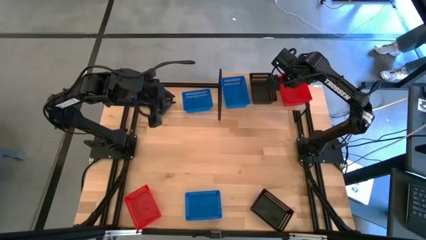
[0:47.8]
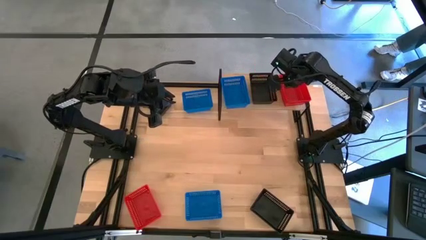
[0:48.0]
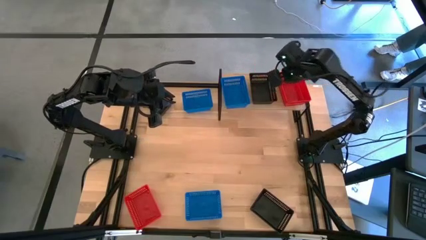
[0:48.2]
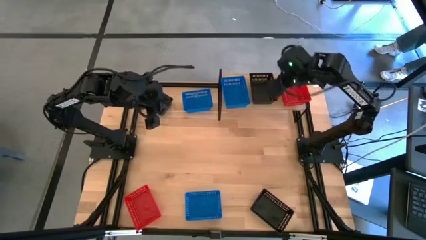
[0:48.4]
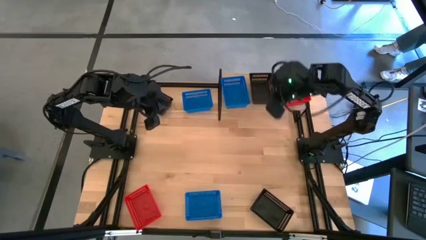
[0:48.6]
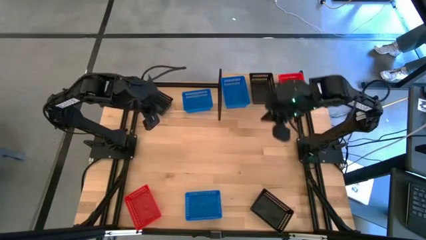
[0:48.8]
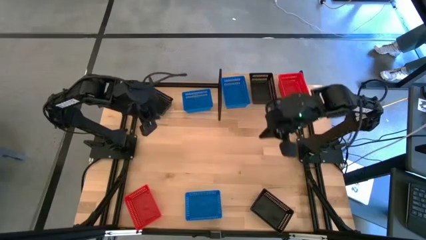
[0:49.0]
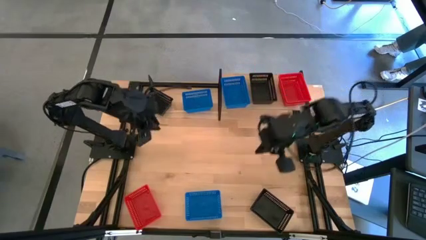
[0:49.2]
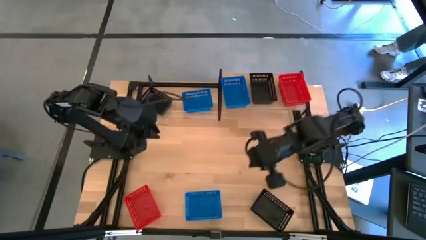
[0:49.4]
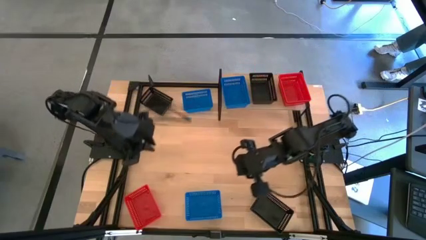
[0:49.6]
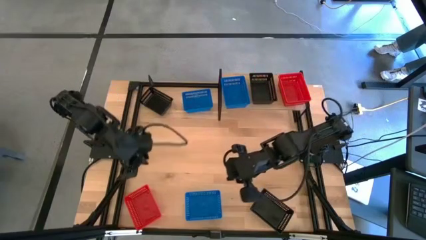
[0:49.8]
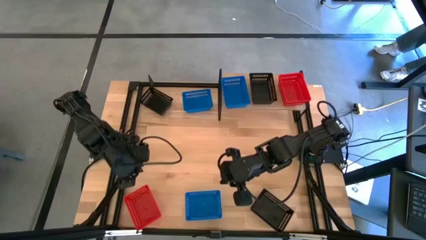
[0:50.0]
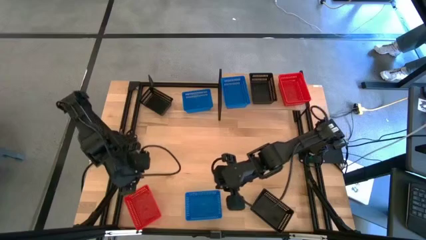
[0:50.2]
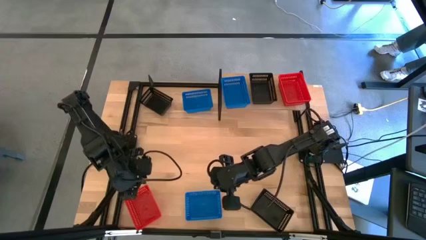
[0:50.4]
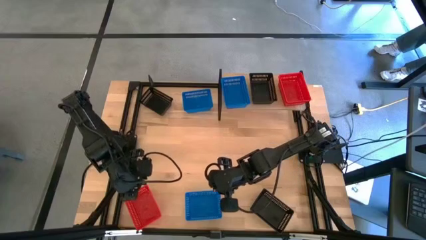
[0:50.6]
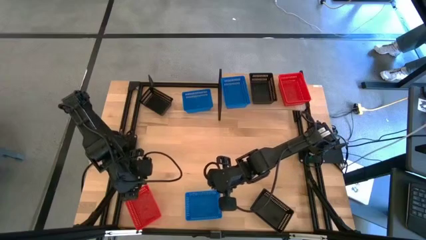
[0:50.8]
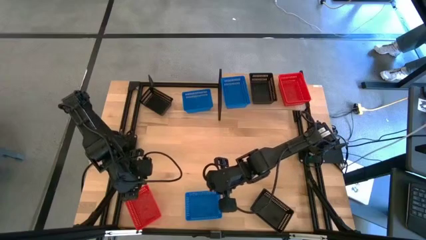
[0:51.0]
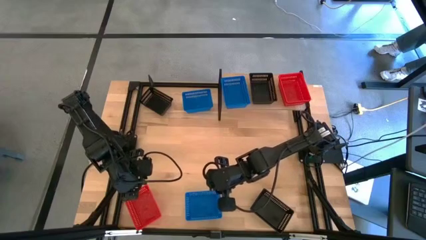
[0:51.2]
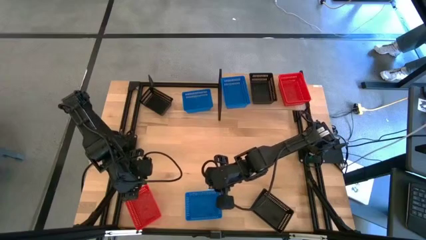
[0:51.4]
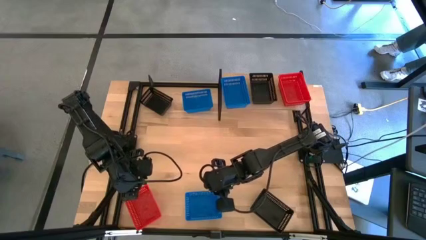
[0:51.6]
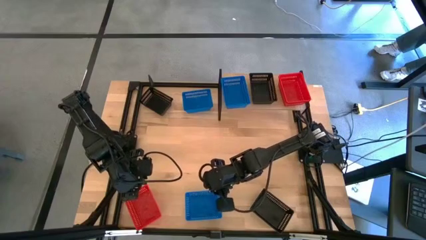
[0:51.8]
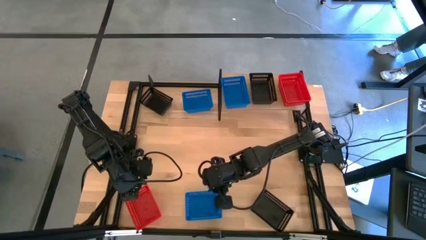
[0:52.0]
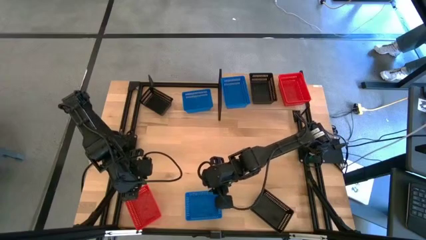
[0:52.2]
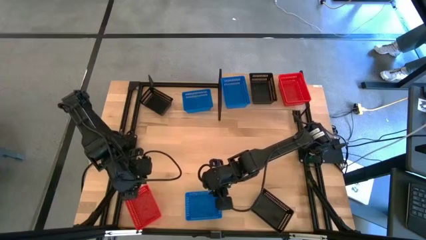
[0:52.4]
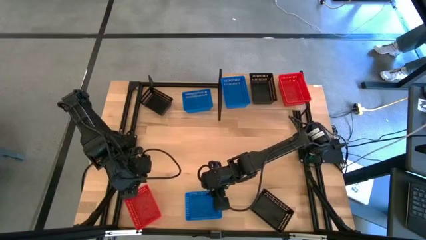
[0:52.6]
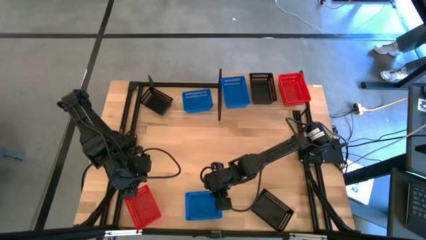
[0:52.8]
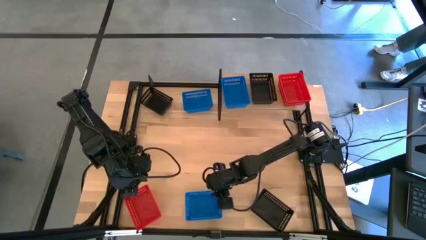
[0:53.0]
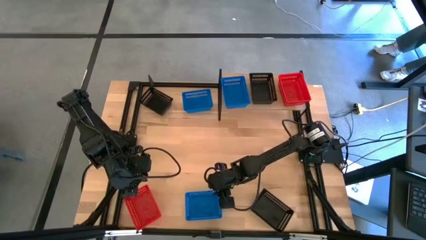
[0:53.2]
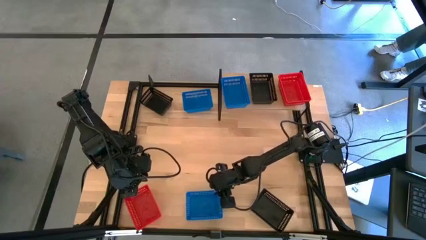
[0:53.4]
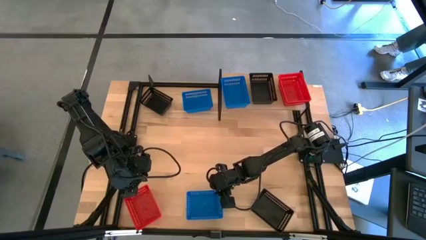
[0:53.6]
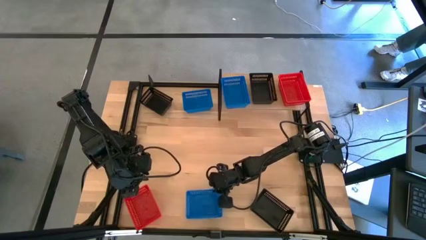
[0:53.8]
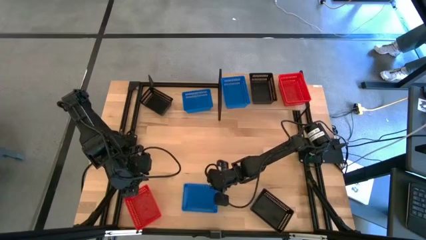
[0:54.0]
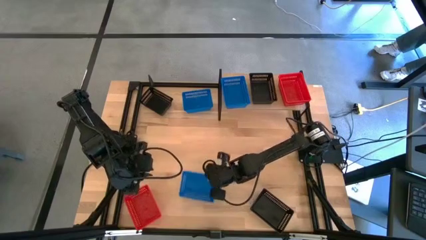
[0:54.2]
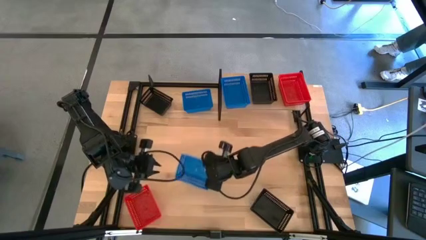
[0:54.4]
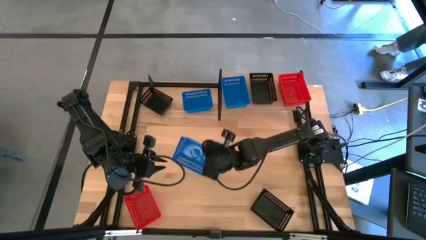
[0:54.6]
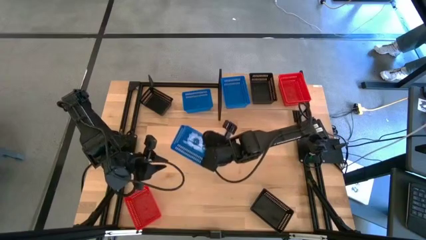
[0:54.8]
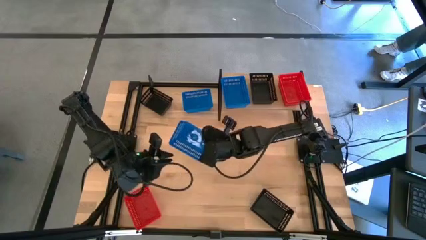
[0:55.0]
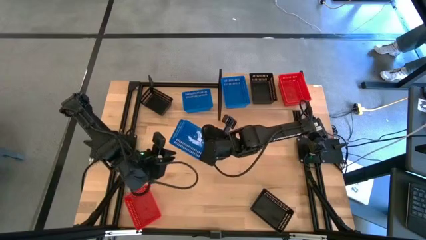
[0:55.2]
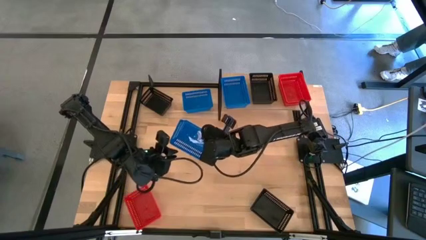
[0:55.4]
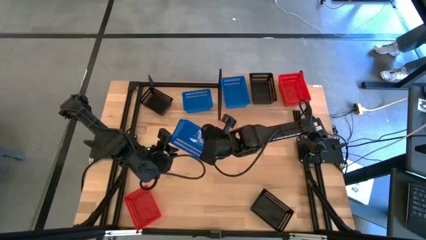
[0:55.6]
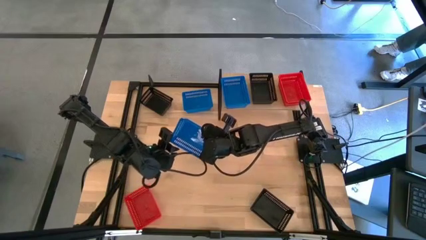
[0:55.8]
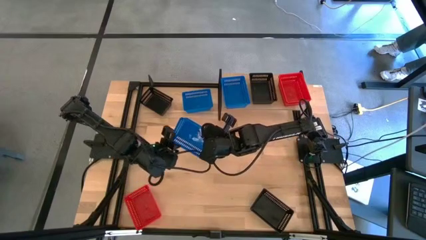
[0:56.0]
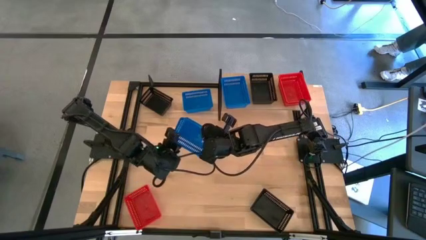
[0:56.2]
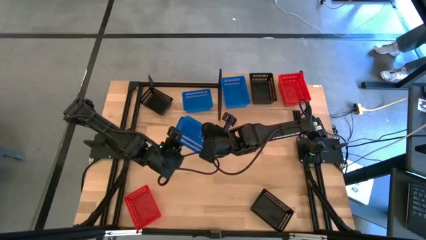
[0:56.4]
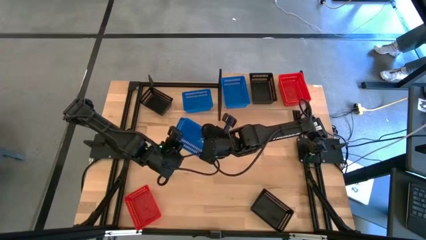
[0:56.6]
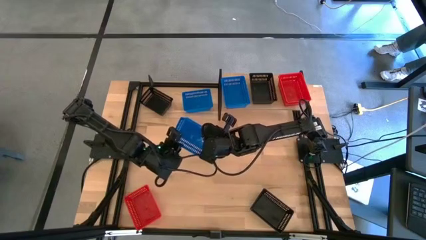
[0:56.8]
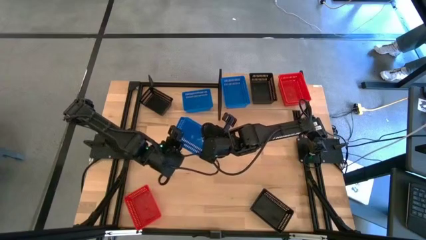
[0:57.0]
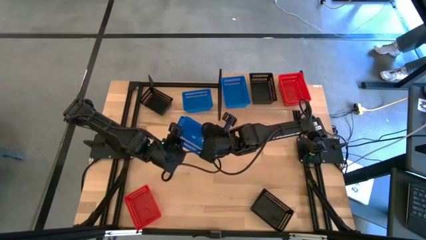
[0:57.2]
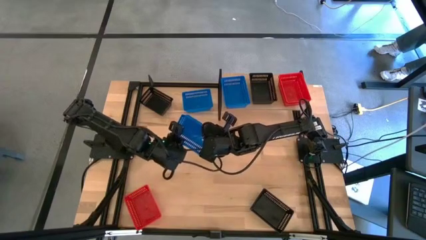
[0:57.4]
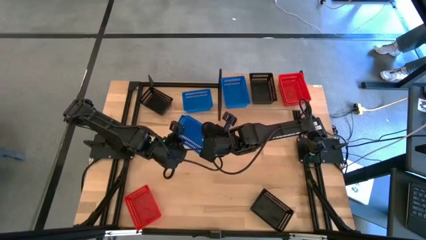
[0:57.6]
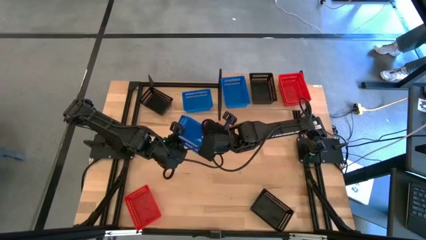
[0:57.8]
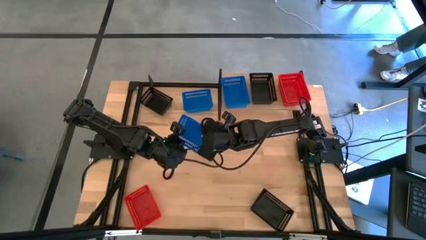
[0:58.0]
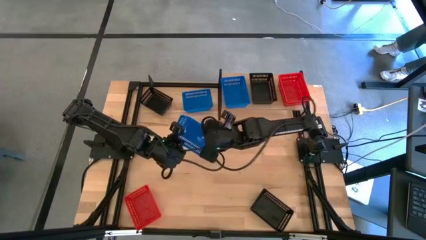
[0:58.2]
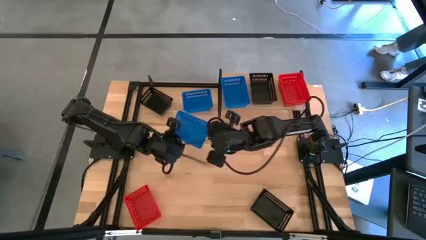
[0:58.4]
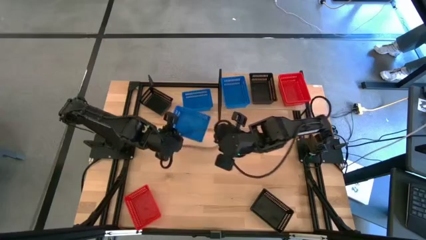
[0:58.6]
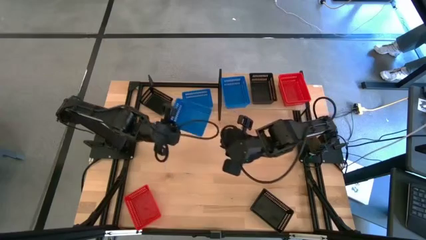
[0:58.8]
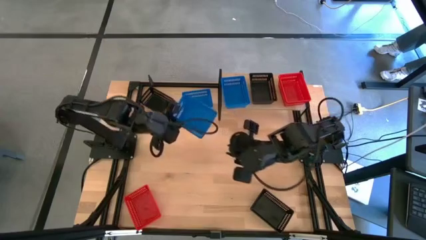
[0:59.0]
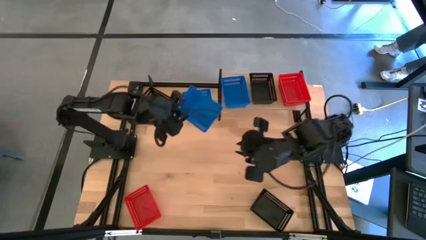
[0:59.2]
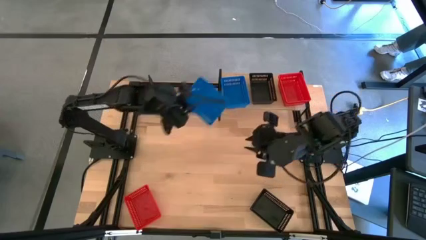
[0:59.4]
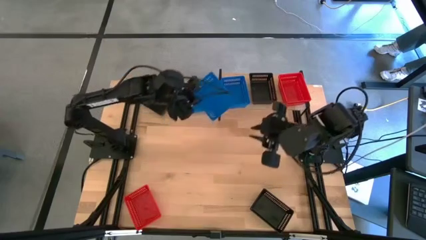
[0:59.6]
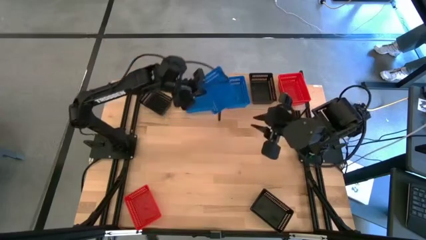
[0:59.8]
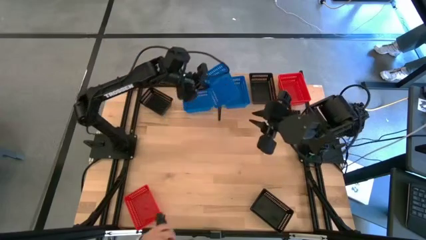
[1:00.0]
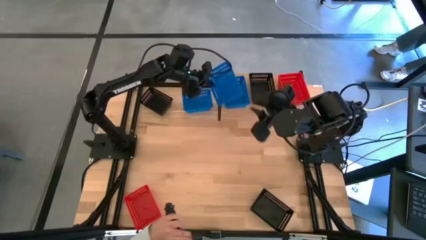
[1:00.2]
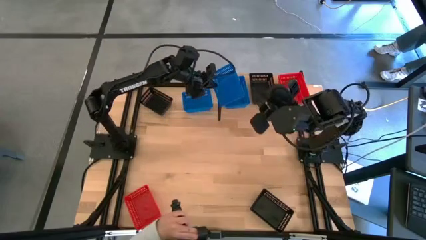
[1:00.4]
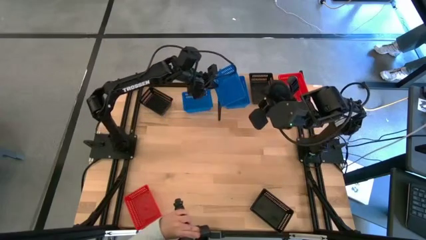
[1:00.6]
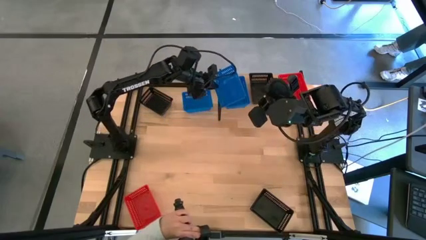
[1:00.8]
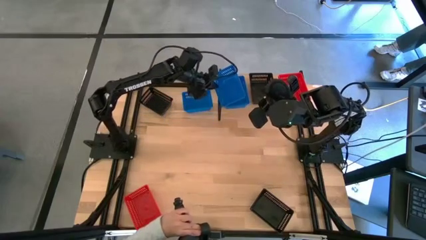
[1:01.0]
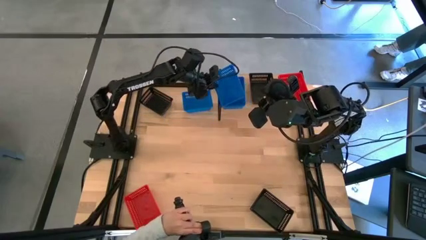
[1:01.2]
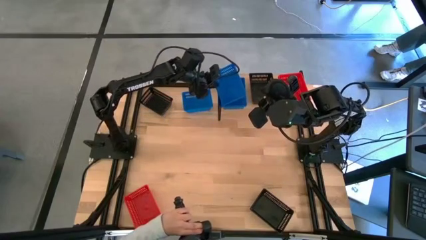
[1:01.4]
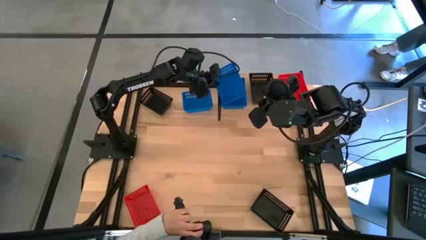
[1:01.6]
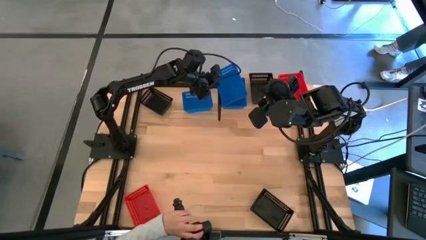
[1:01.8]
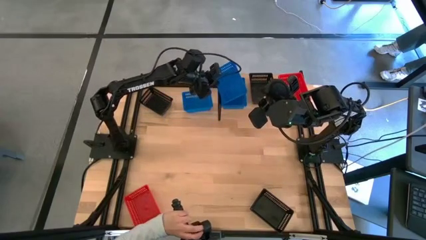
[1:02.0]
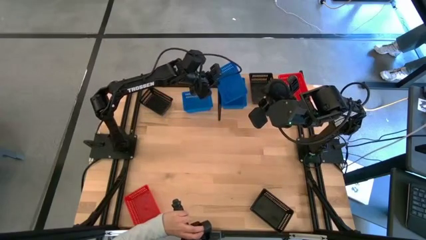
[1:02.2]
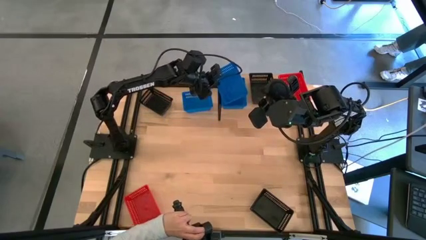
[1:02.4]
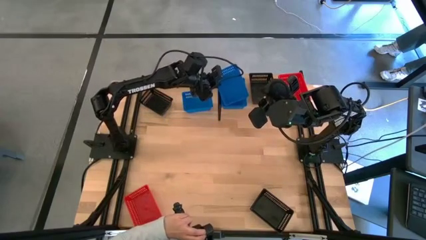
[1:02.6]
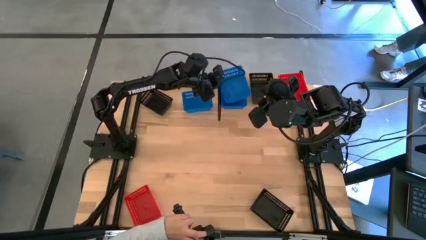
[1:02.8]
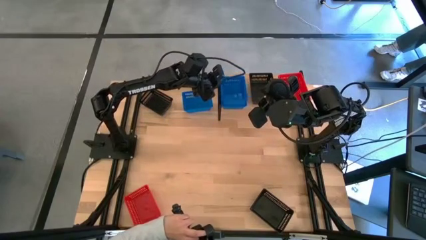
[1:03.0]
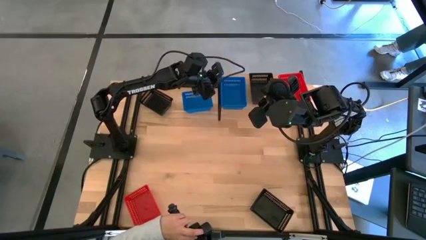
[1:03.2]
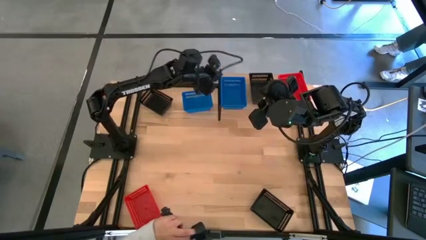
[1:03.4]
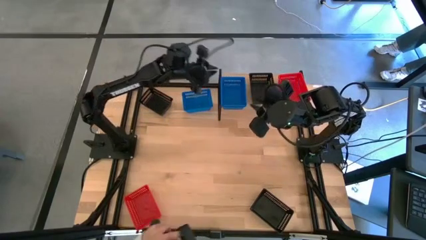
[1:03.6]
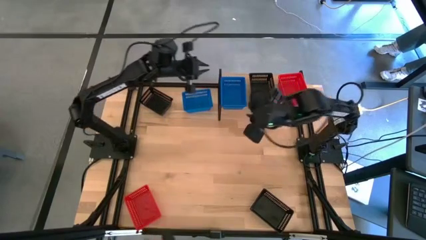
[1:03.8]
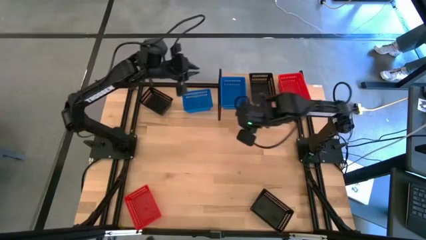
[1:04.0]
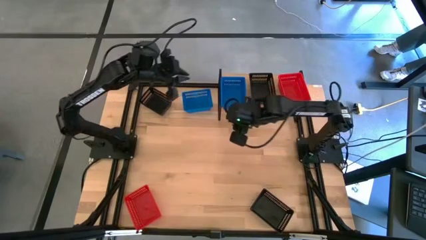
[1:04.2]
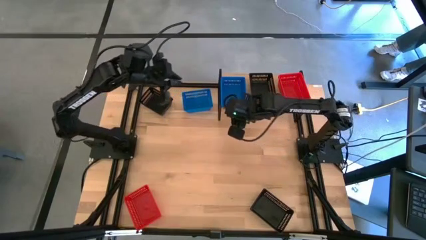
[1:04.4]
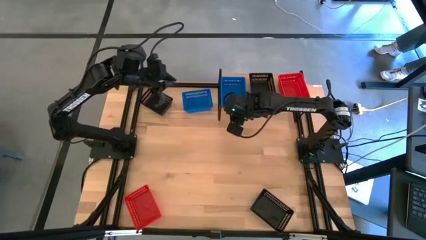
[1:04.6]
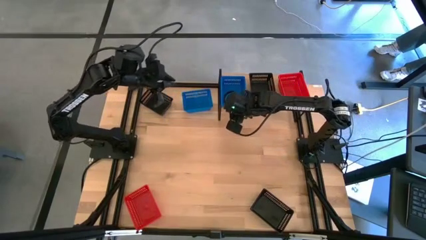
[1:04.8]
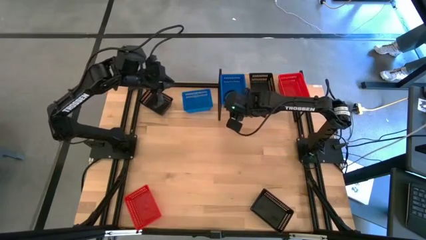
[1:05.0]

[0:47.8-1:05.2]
Task: Stack baskets on shelf by color
Stack the bottom blue bin on the blue bin on the shelf
